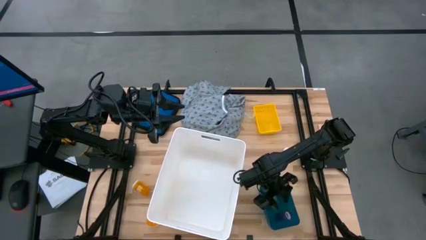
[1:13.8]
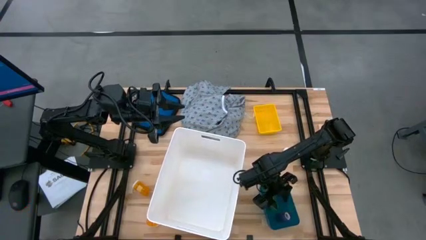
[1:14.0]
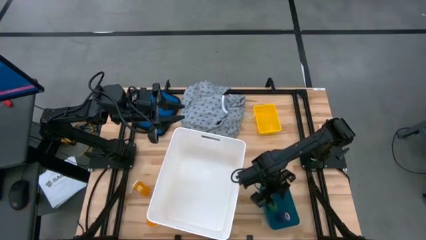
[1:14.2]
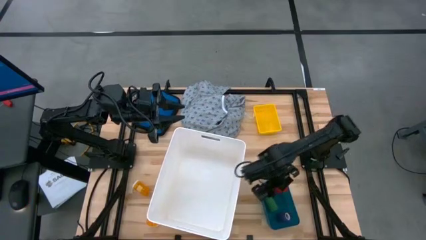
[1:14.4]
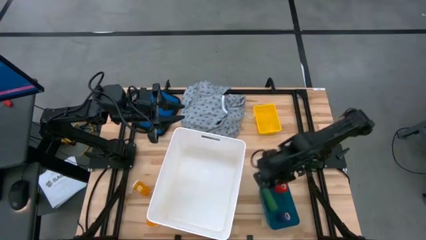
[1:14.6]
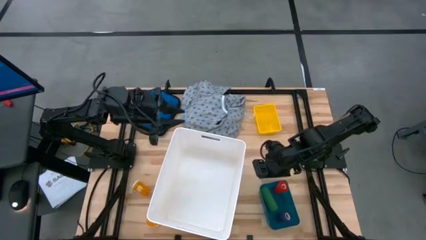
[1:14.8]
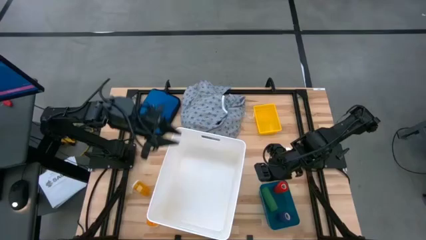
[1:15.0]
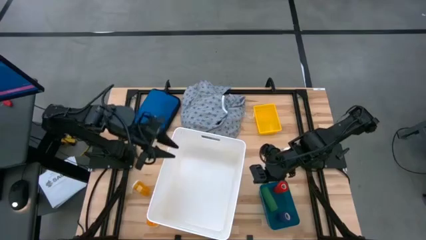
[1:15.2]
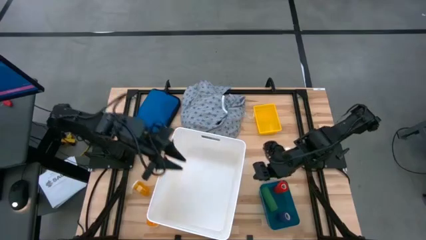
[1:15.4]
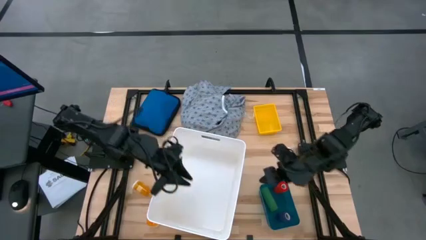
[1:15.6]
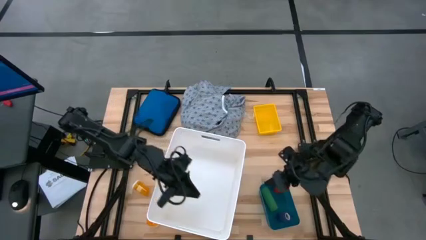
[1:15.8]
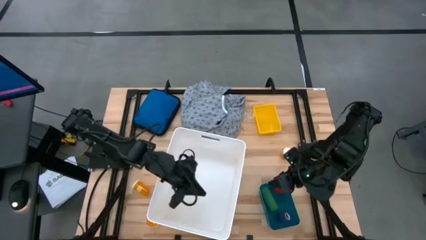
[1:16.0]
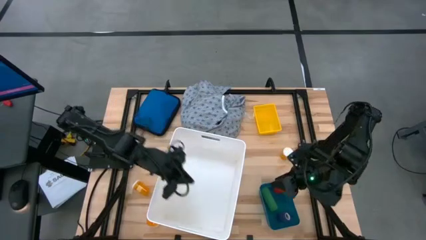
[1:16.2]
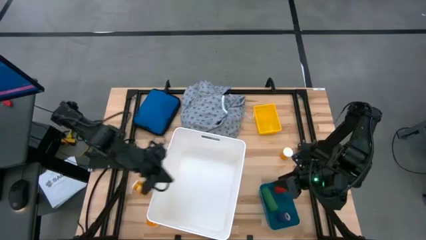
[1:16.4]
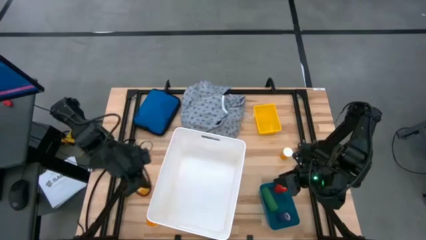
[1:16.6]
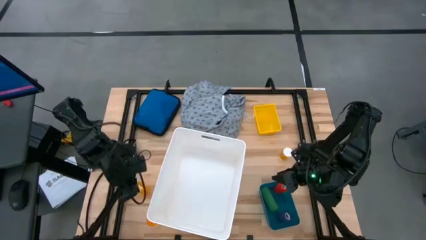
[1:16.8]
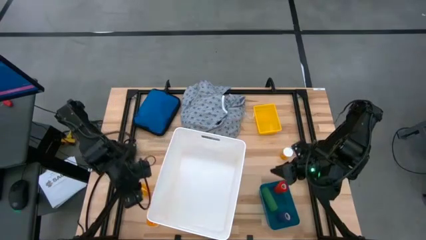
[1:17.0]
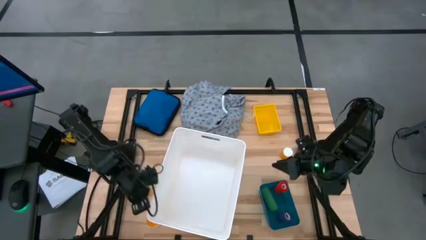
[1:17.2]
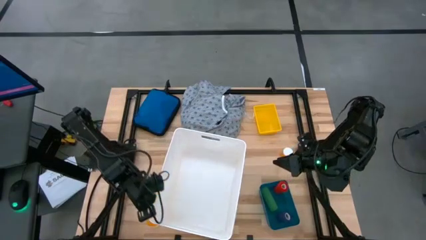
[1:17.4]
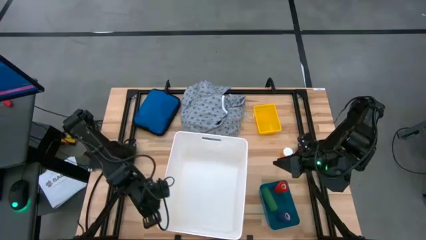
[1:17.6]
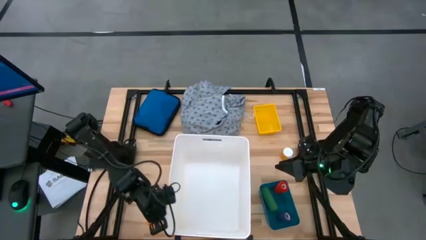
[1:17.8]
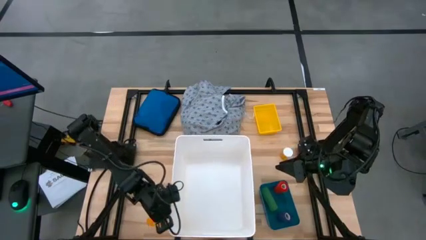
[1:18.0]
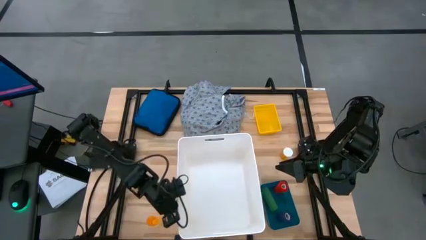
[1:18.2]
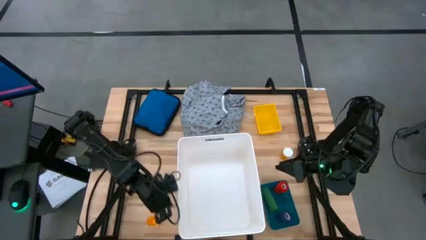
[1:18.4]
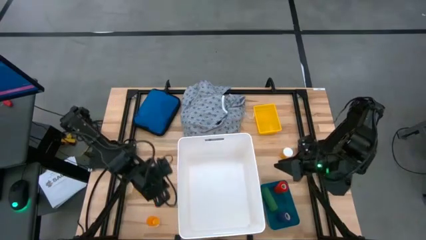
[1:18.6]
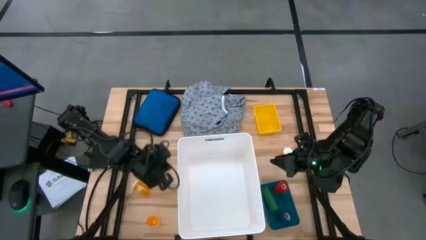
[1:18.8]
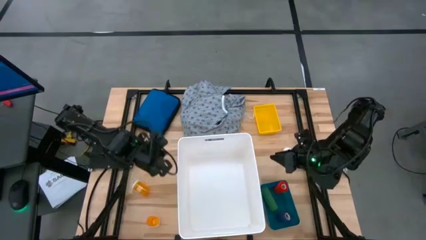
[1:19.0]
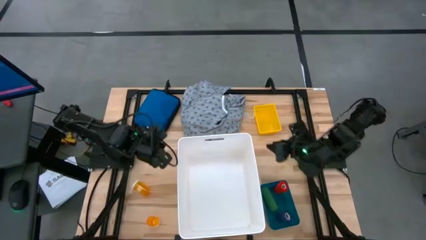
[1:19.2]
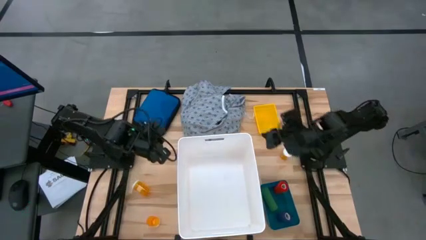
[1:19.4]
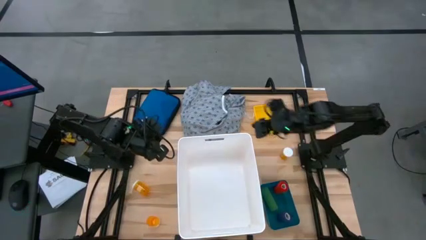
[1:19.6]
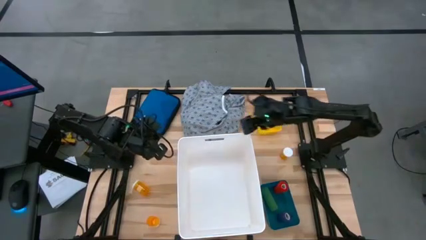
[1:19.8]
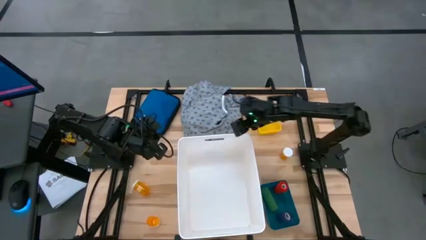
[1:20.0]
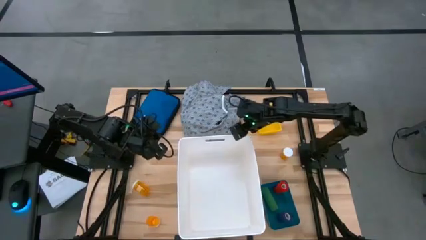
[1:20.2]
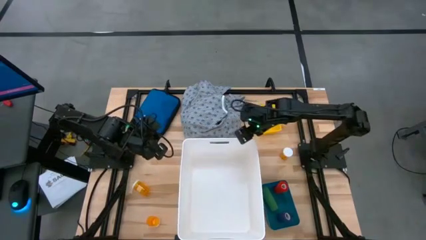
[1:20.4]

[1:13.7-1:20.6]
Task: Pick & place medical supplies in basket/bin
Adjust the white laundry bin

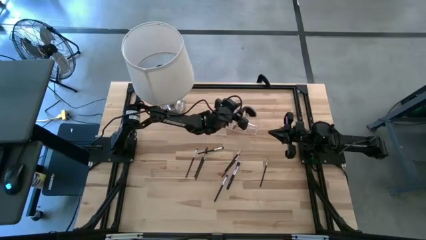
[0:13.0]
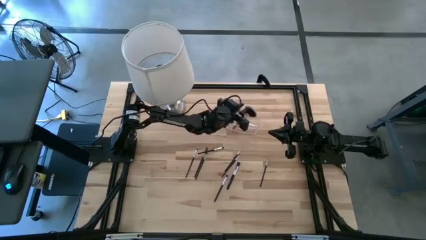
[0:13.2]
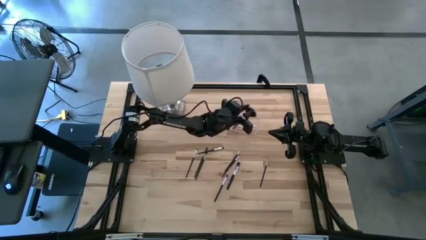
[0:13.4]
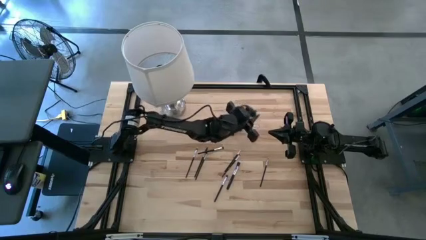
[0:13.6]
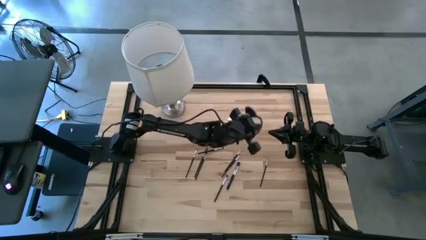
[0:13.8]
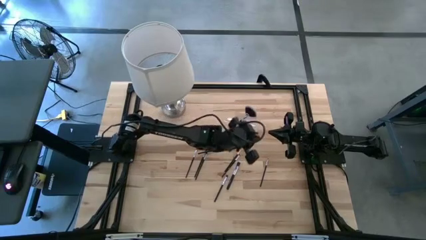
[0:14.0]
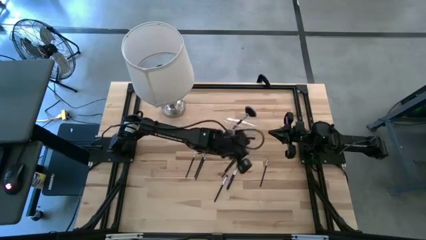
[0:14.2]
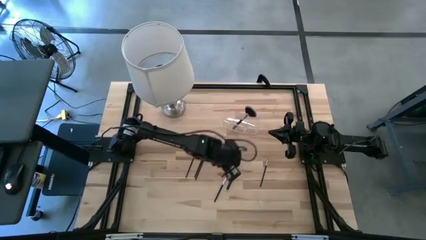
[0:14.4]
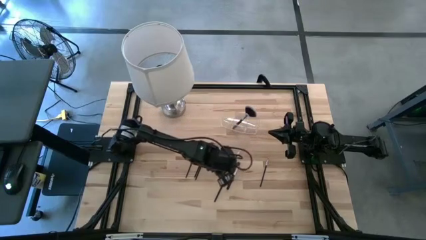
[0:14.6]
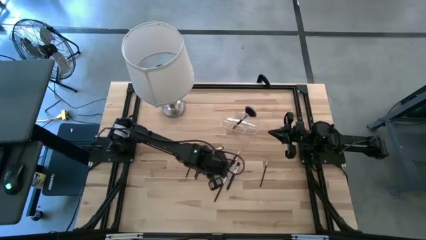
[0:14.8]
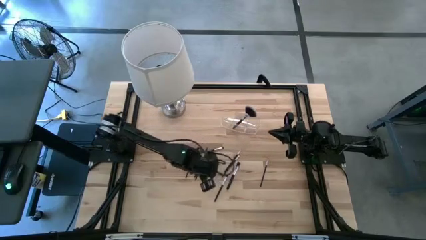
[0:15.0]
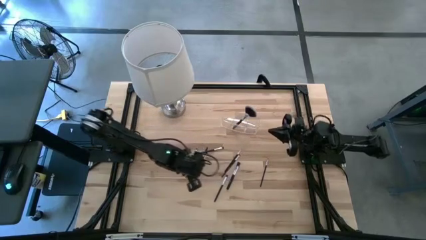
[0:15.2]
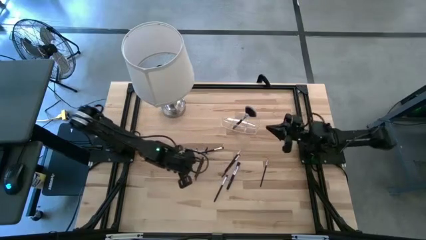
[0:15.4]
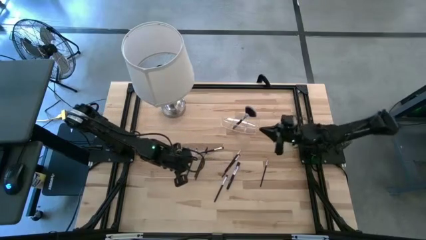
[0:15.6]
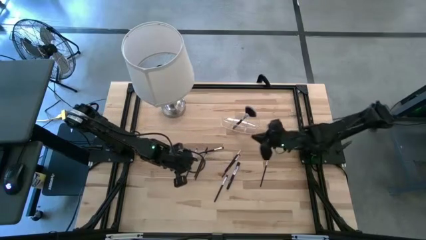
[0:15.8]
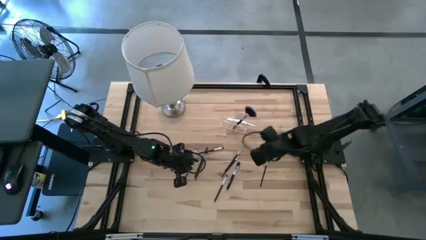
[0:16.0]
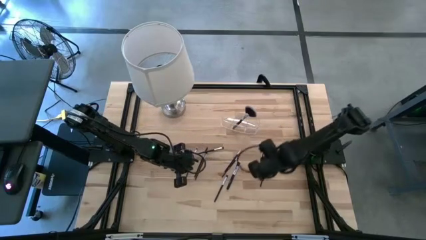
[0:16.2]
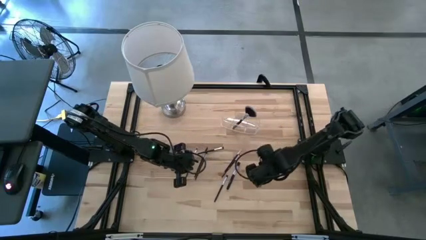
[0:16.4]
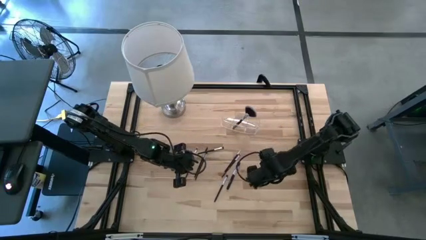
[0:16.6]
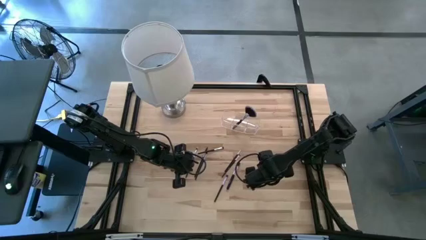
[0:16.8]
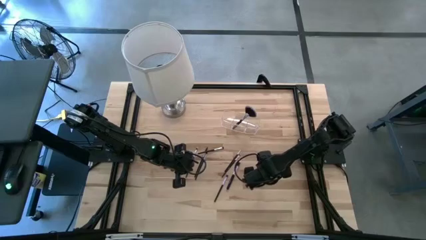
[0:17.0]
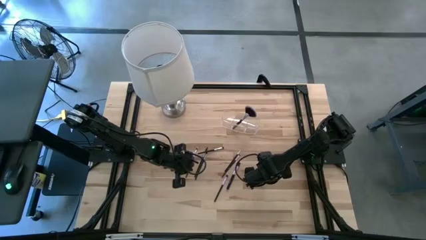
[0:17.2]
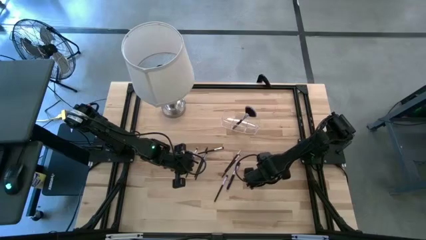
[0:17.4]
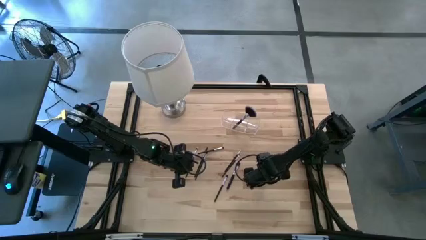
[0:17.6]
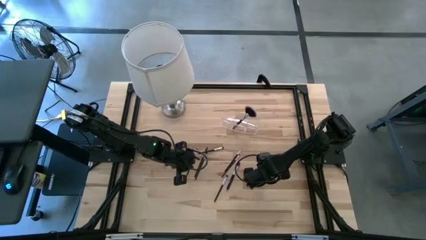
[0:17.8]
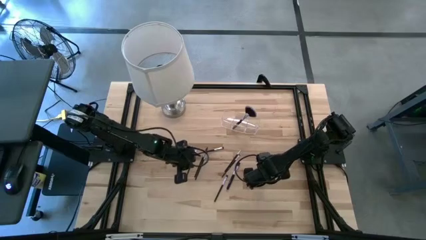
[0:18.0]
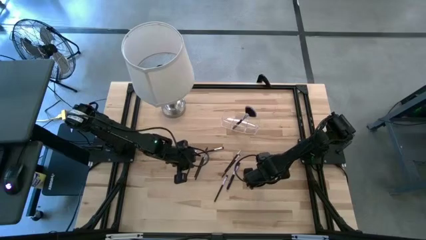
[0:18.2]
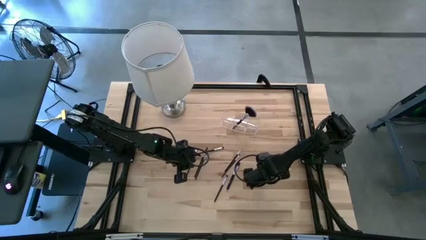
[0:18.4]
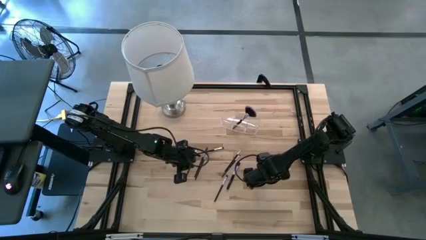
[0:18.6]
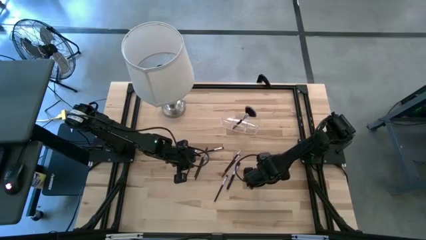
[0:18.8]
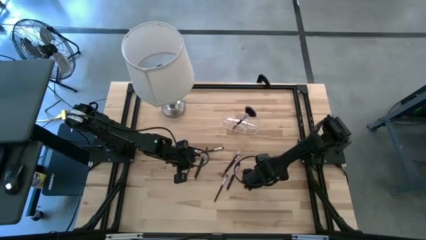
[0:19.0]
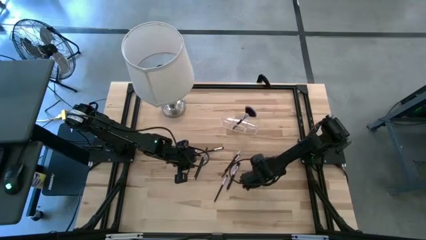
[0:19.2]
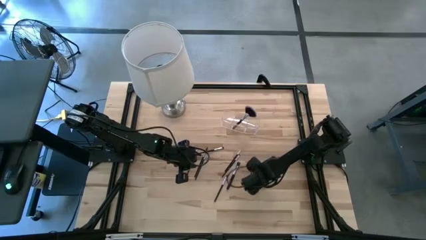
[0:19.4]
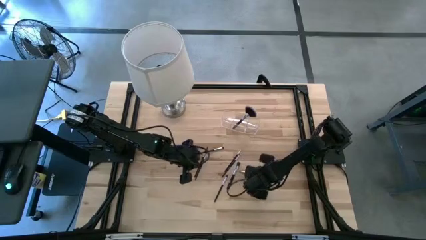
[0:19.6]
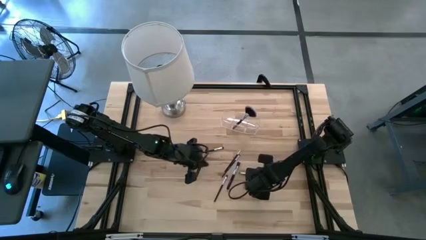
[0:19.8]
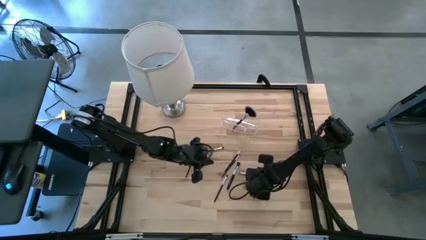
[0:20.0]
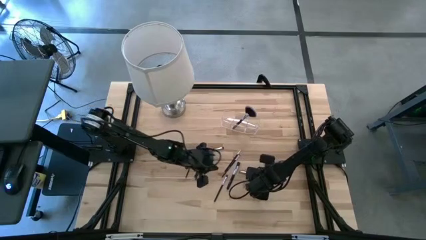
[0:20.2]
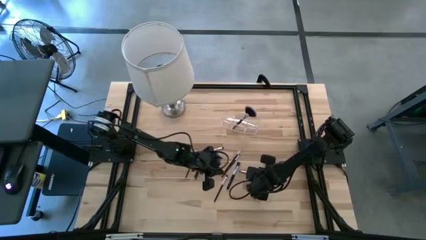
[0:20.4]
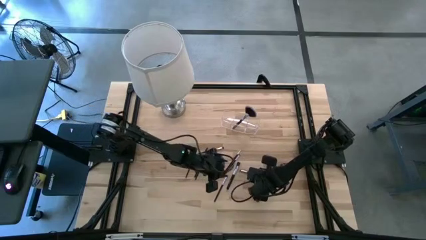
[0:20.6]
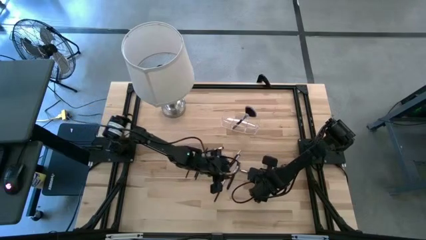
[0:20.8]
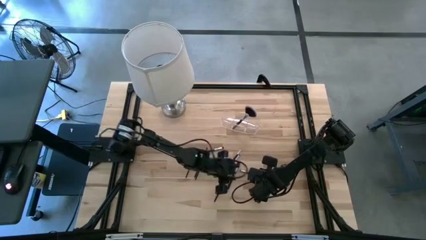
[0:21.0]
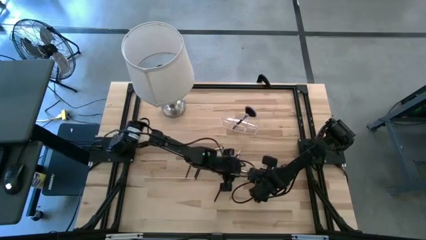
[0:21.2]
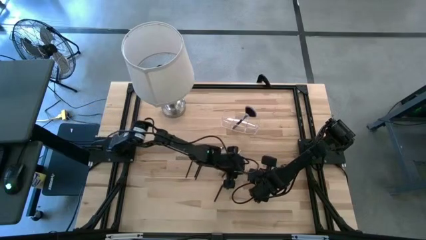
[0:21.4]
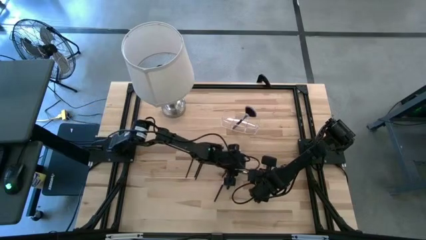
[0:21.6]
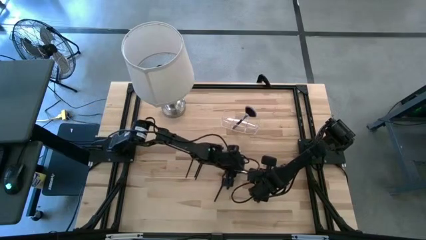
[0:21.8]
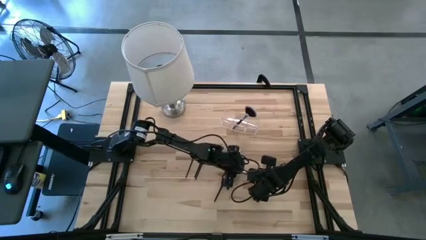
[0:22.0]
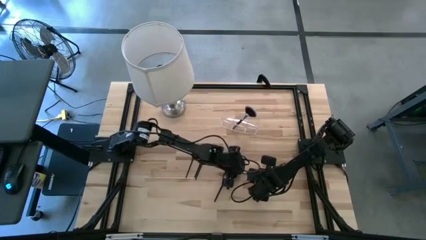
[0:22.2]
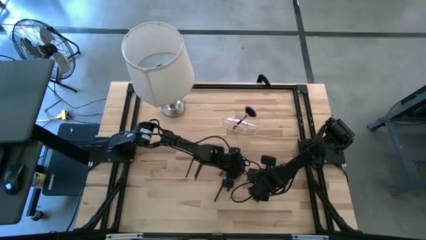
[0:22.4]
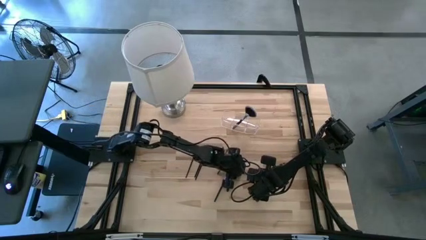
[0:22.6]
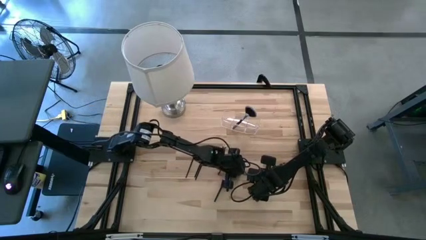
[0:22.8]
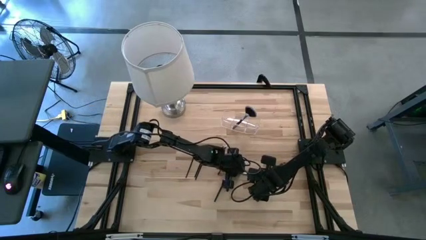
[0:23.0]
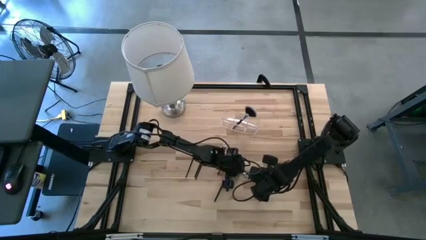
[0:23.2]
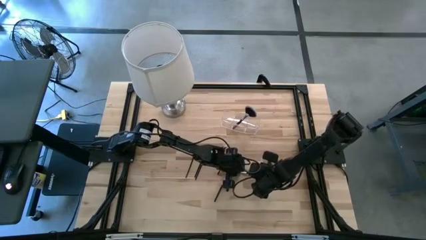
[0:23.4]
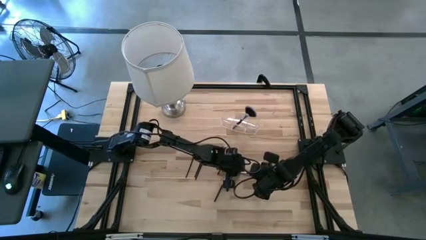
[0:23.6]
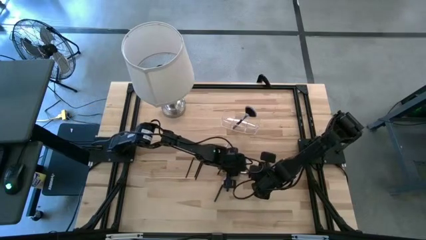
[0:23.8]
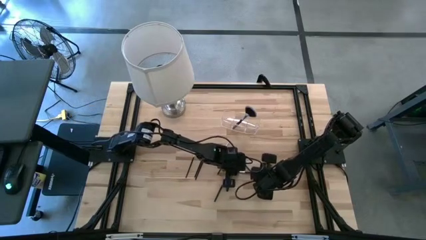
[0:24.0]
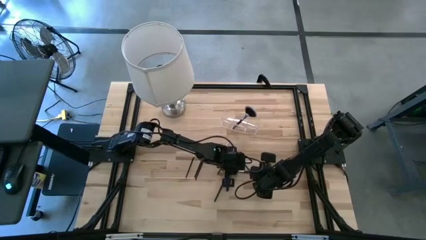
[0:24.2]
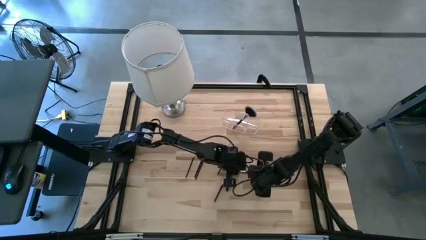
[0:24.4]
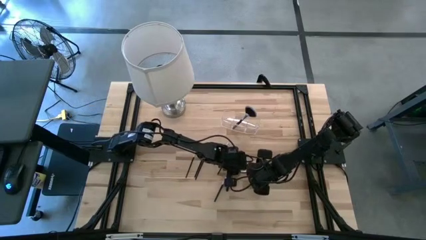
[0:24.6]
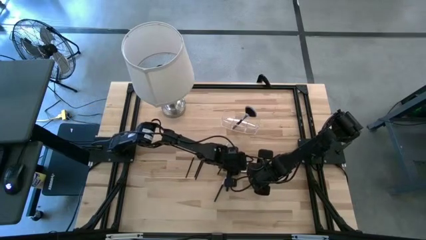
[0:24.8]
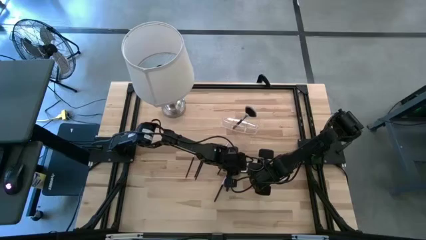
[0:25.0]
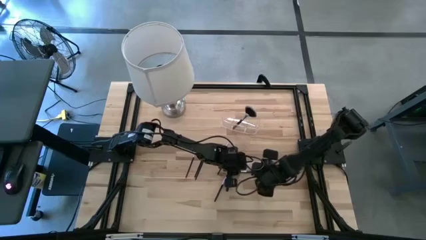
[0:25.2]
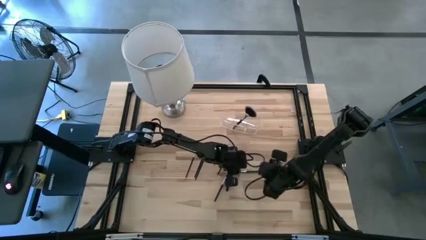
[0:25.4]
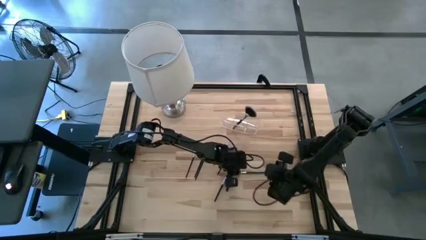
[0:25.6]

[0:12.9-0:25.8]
Task: Pick & Place Makeup Supplies
Put the makeup brush into the transparent organizer
